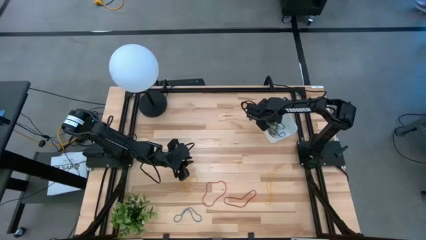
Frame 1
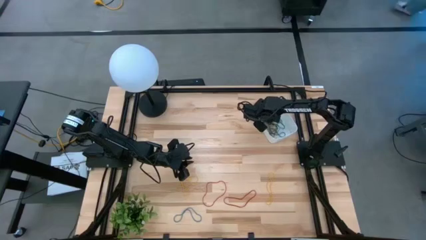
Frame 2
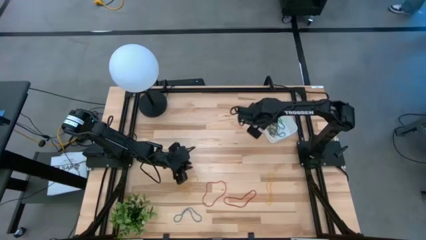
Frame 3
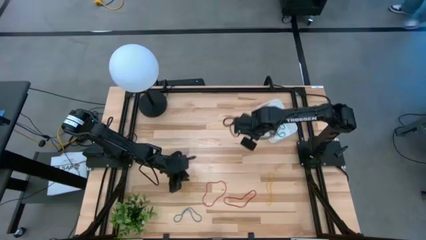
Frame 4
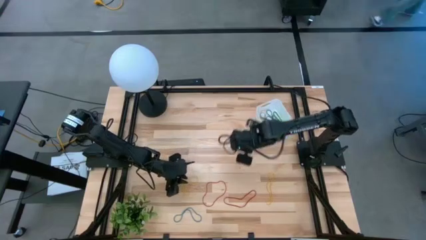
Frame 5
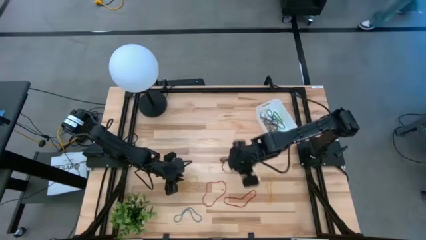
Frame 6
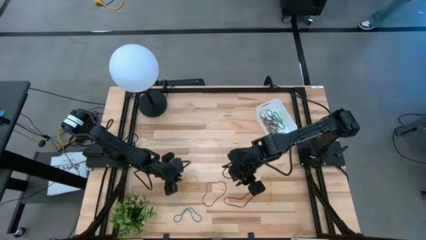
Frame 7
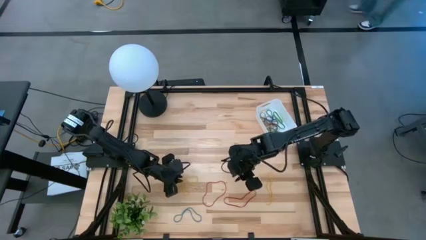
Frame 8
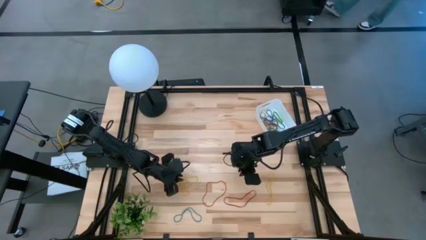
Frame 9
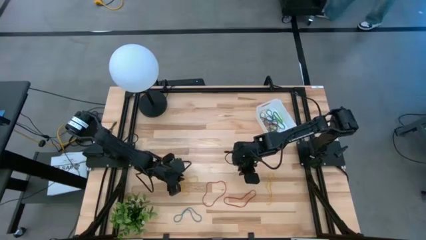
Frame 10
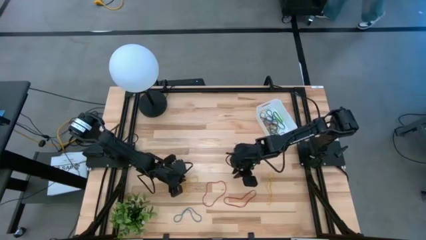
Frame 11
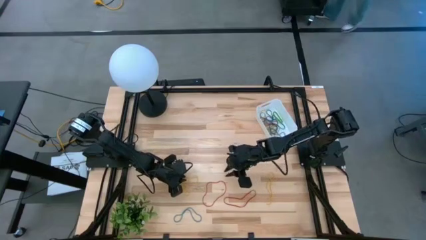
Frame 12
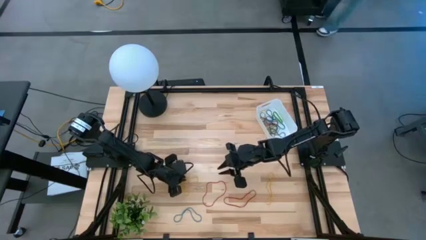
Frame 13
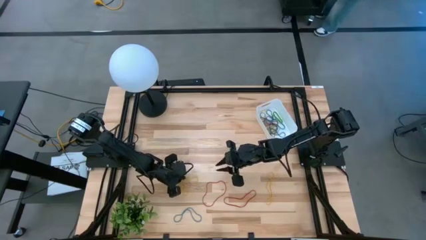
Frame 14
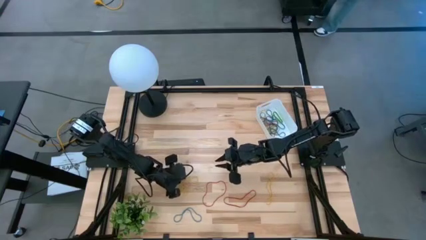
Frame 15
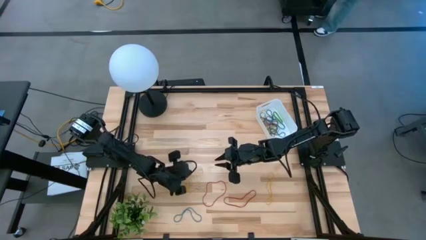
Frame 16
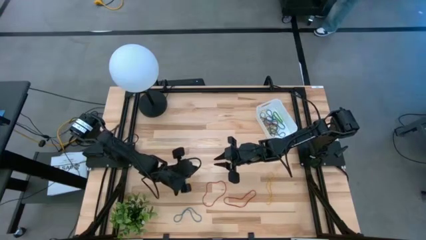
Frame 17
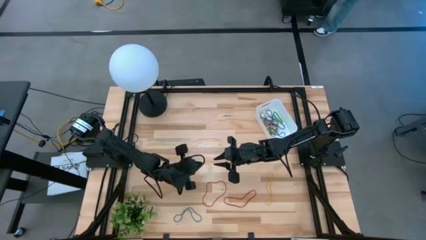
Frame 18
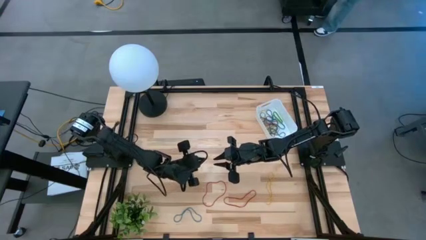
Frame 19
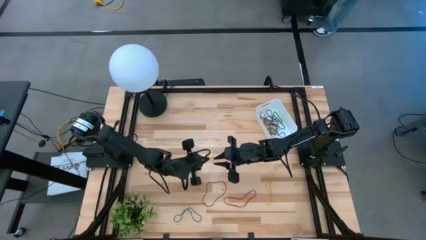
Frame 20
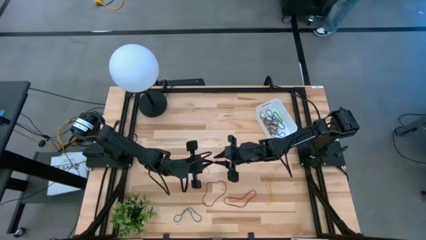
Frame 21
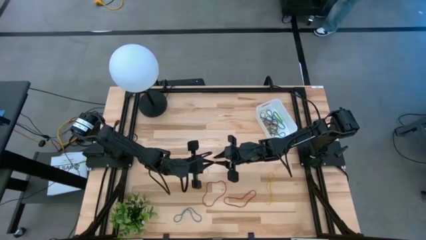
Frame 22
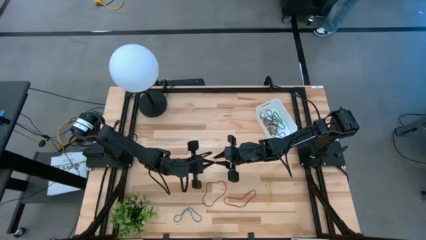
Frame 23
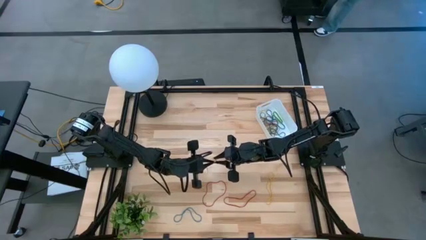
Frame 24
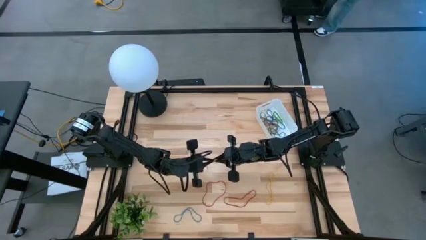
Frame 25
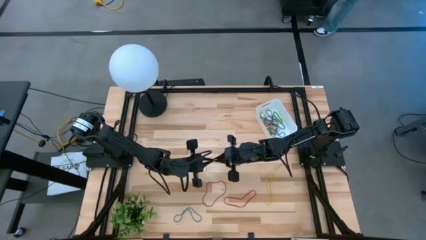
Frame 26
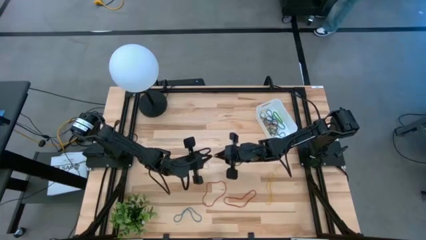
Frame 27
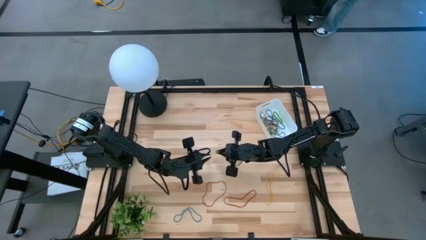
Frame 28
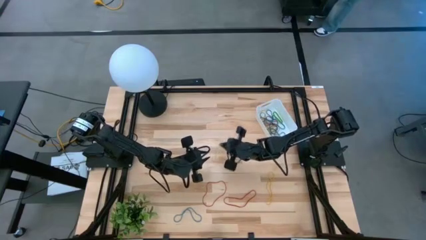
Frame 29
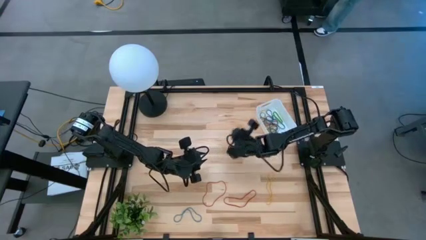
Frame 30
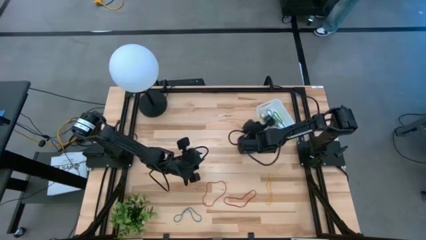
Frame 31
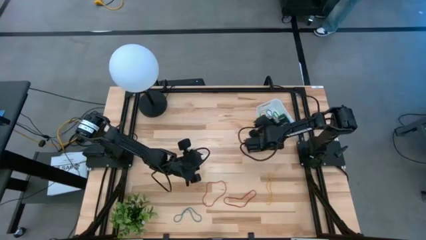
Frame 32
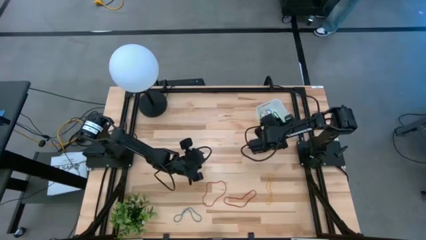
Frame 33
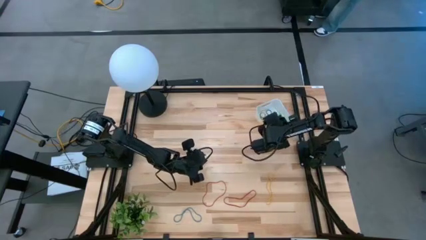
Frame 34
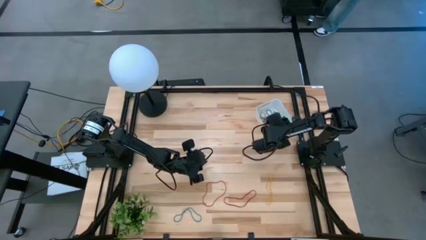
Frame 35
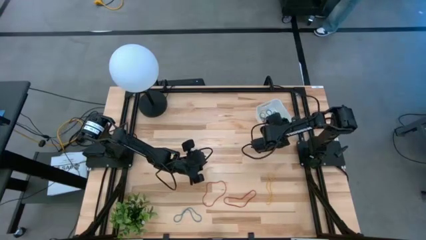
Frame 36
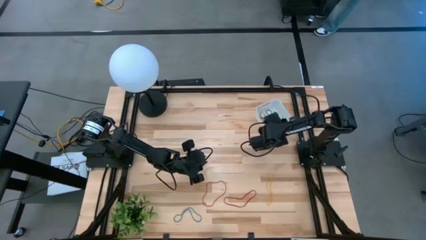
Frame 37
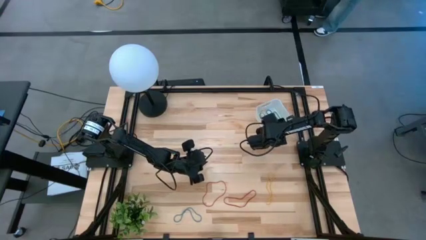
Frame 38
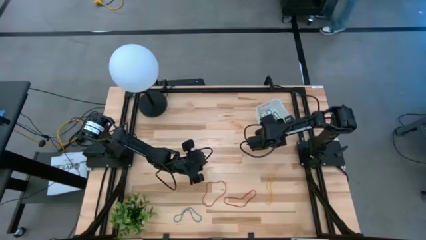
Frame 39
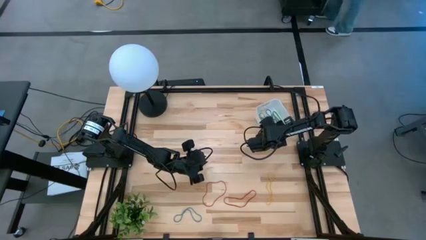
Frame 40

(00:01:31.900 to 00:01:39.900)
Task: Pick and place items into bin
Put the left yellow rubber band into the white bin

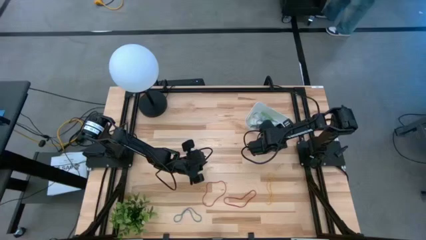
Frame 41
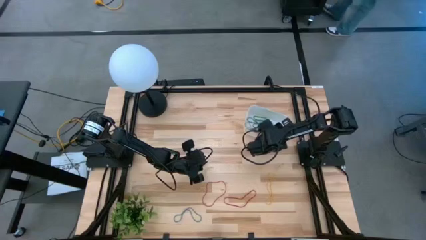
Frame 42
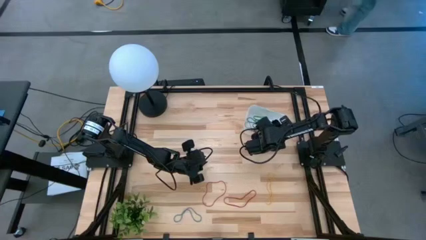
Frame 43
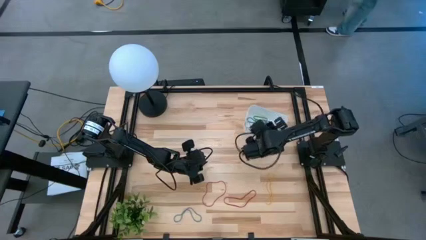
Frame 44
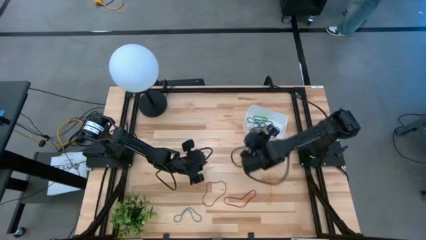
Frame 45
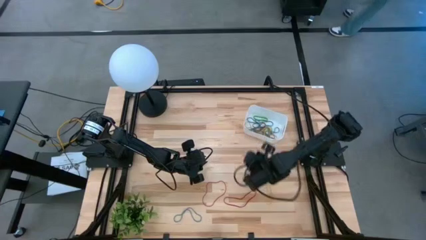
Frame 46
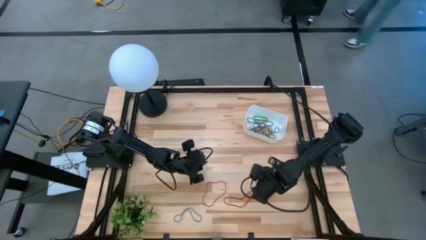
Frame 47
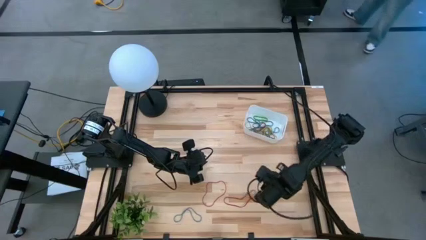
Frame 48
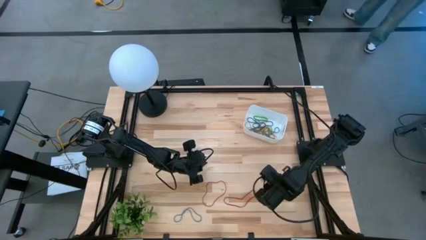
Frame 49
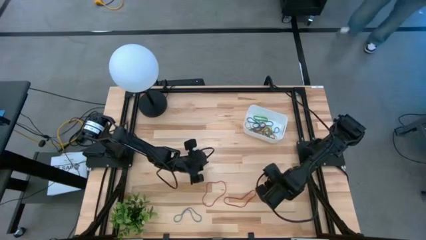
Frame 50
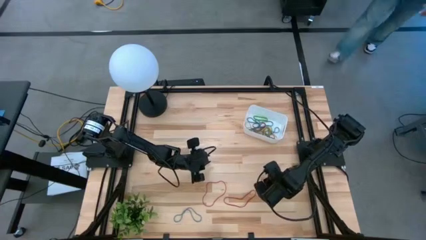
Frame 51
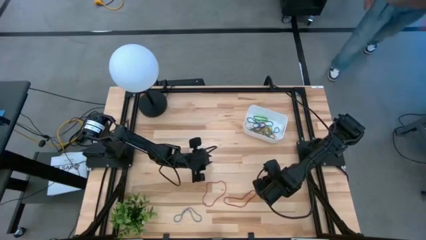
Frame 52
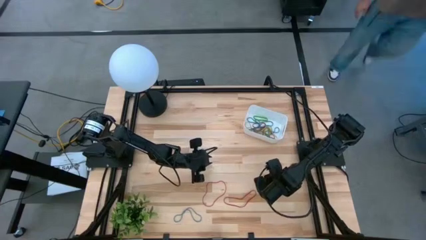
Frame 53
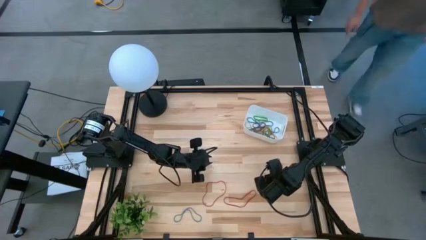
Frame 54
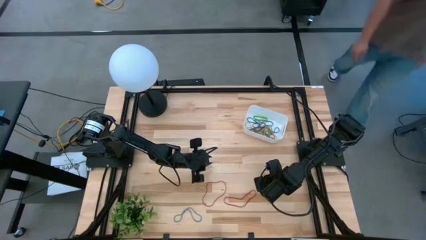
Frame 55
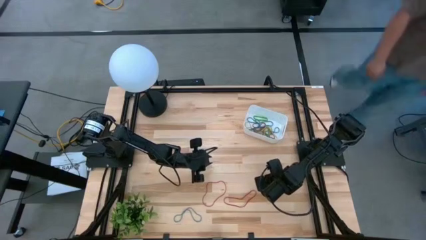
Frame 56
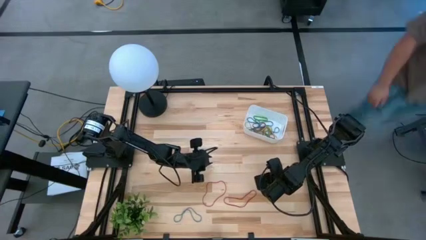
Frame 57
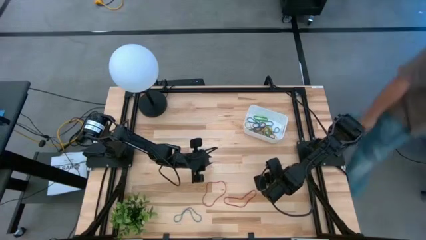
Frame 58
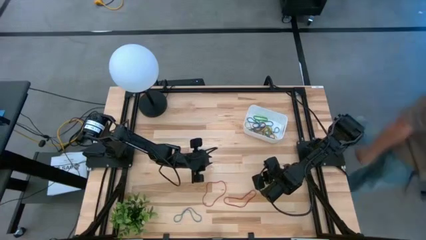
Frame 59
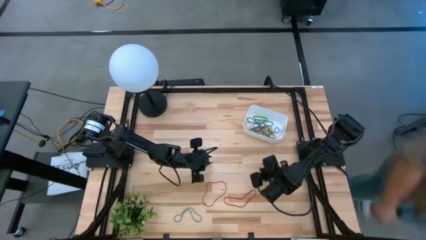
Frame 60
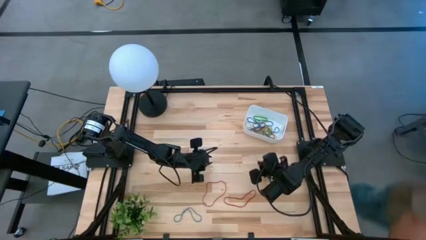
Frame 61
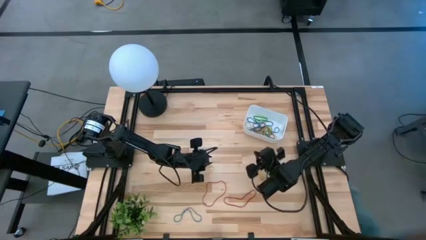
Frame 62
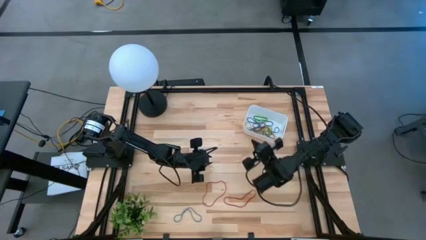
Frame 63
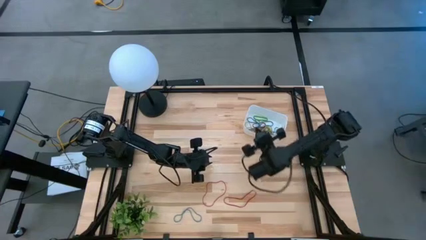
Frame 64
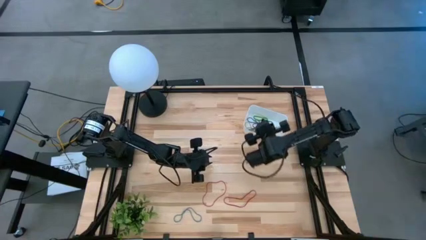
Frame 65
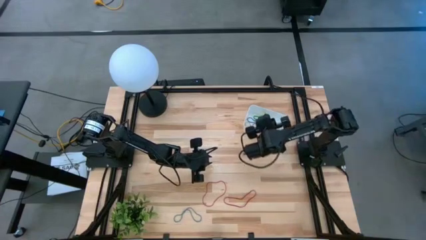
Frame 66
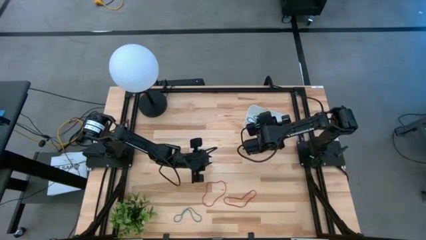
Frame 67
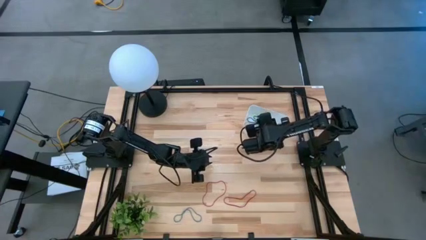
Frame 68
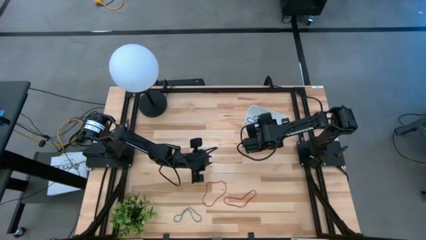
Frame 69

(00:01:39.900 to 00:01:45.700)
Put the yellow rubber band into the white bin

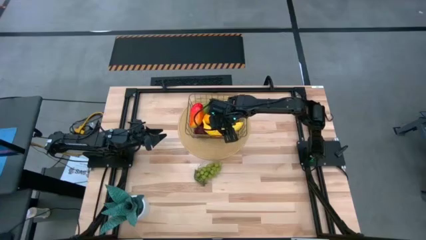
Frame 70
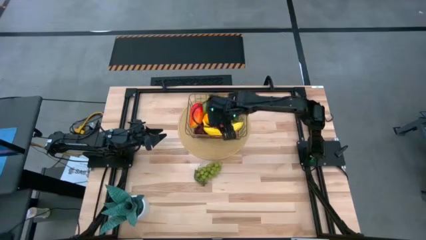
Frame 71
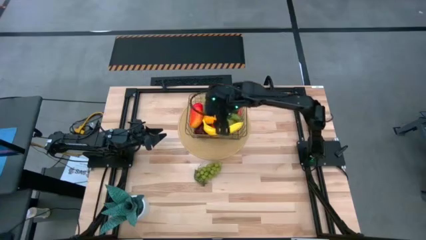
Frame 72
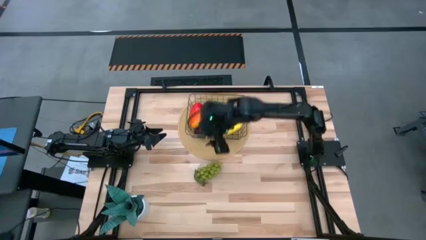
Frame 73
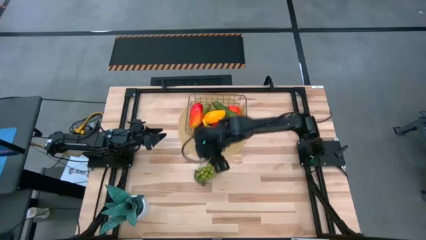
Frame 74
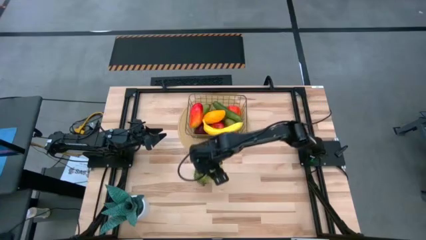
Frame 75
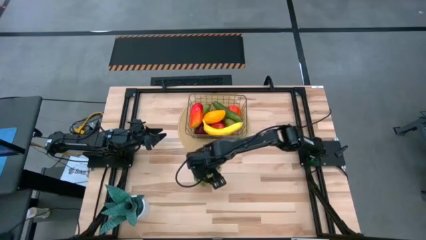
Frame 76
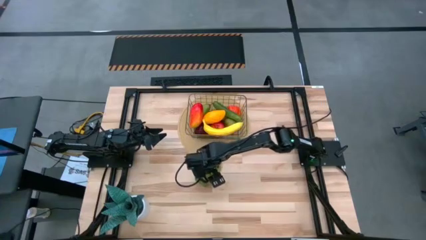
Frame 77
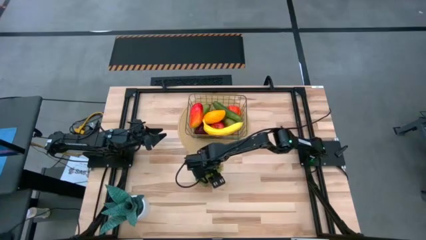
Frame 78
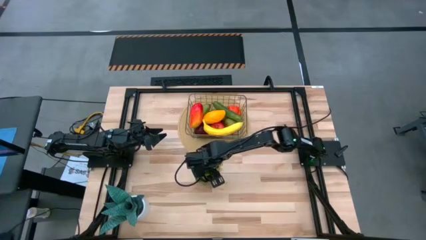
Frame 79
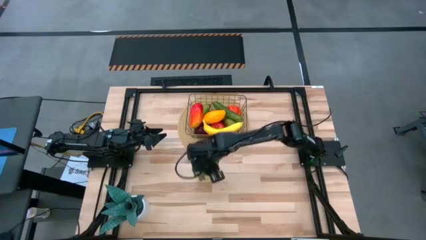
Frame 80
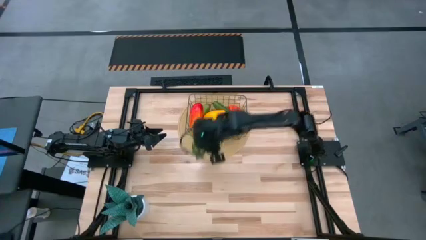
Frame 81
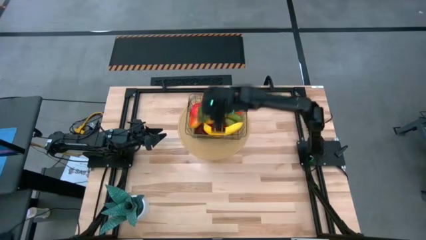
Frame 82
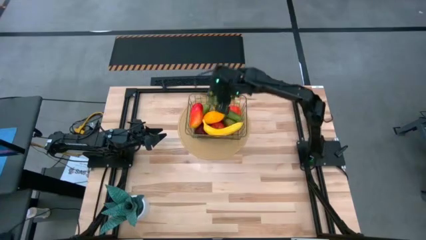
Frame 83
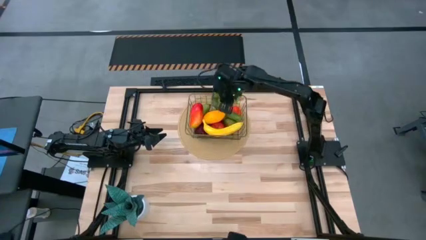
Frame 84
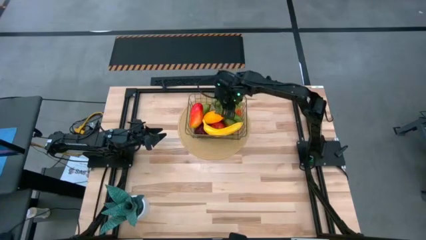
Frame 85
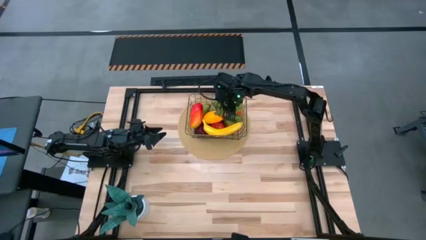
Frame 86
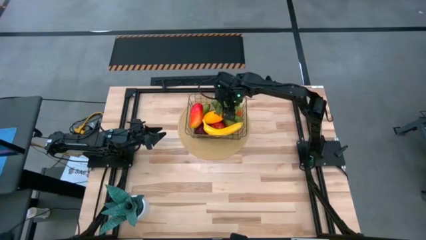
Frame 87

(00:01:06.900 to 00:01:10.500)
Task: Build produce basket
Put the green grapes into the wire basket
